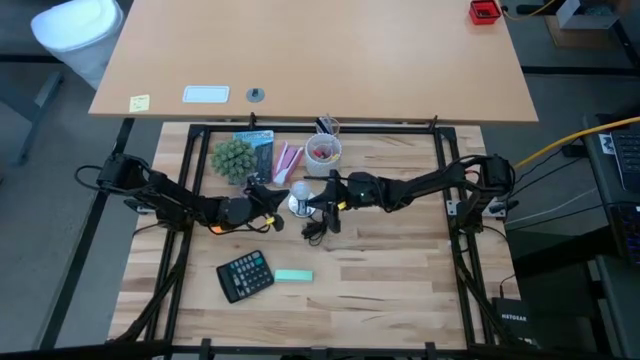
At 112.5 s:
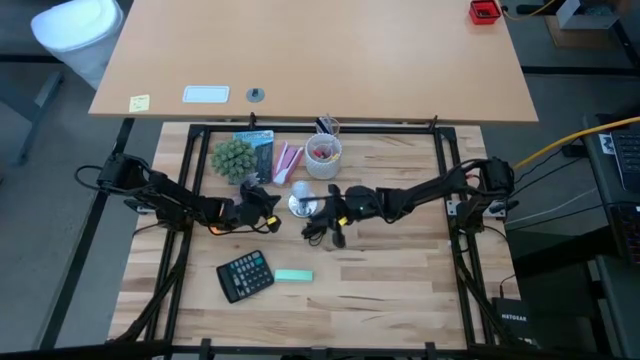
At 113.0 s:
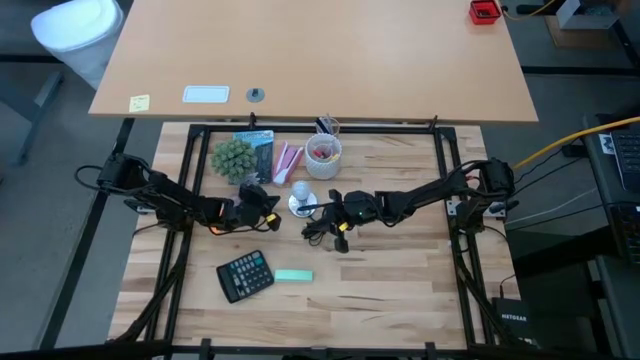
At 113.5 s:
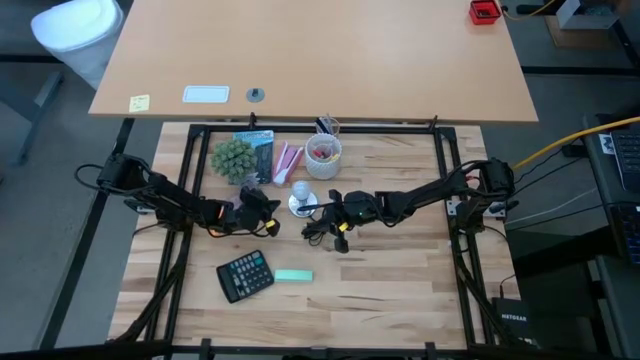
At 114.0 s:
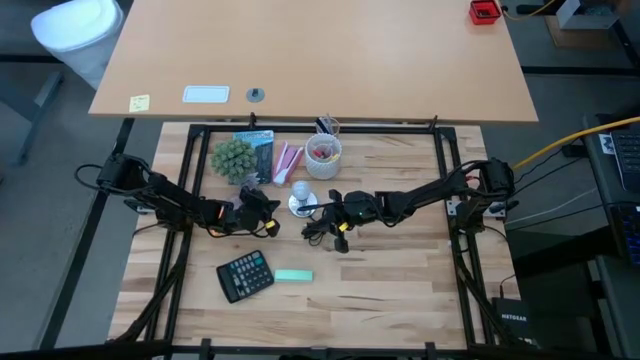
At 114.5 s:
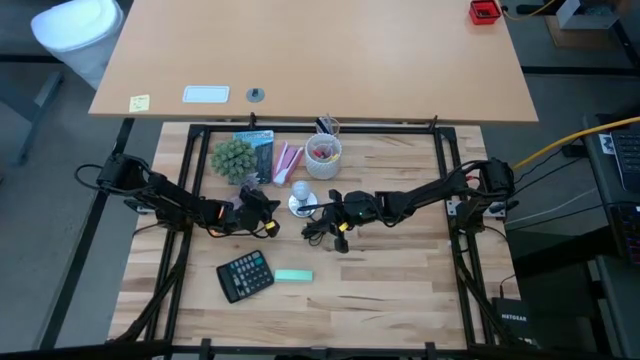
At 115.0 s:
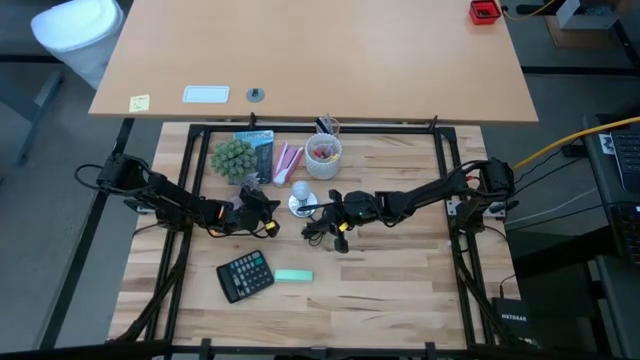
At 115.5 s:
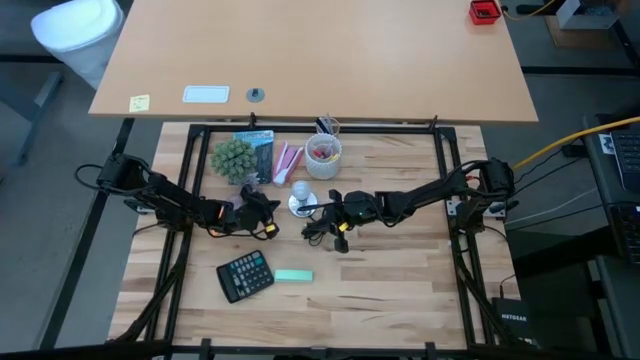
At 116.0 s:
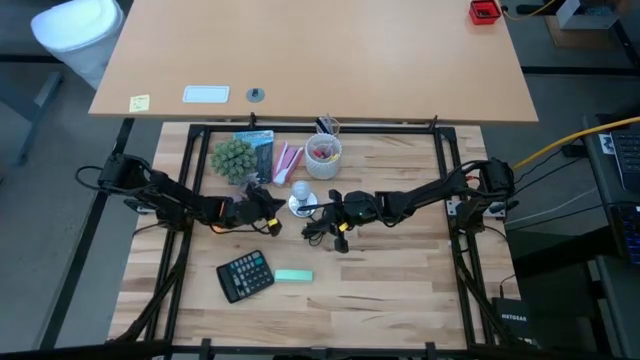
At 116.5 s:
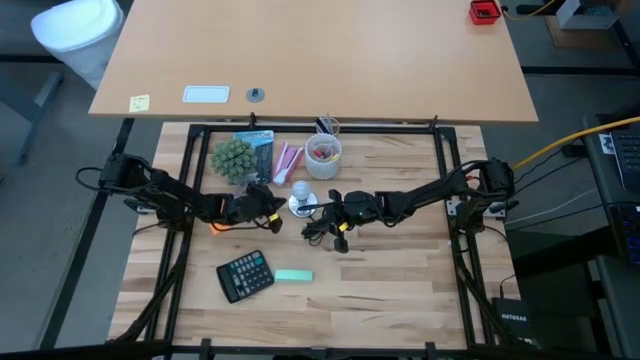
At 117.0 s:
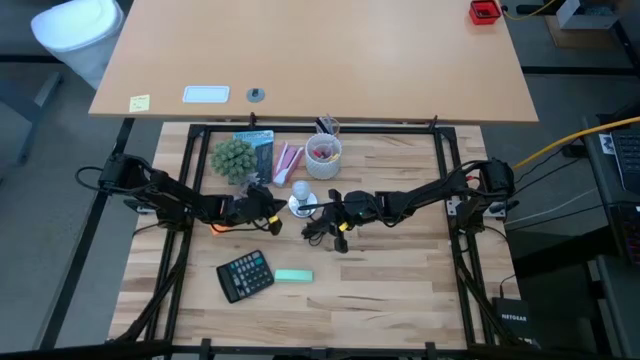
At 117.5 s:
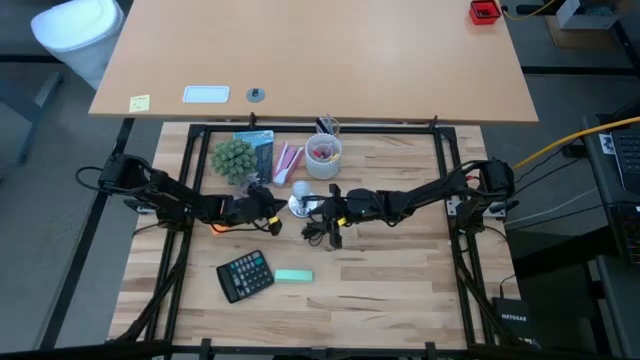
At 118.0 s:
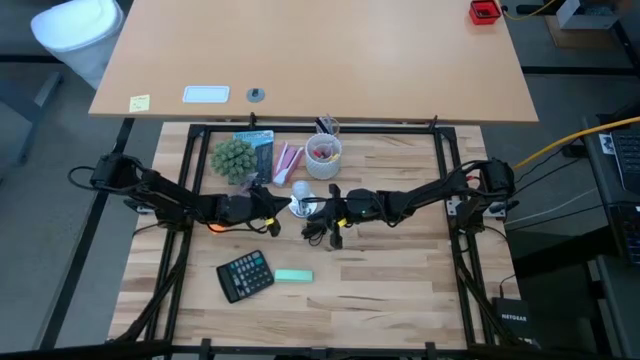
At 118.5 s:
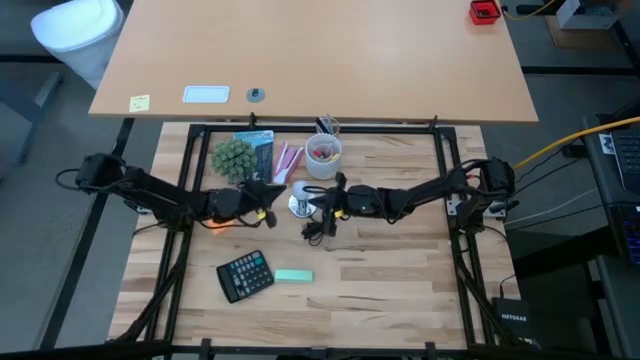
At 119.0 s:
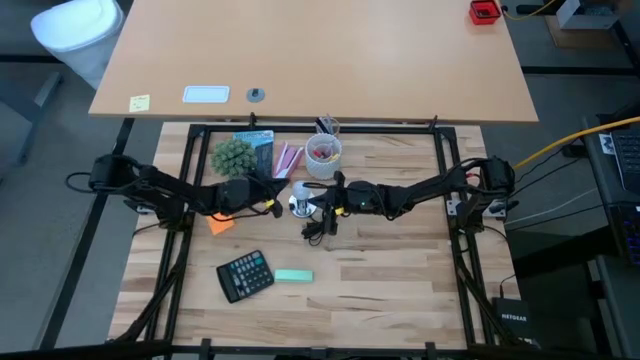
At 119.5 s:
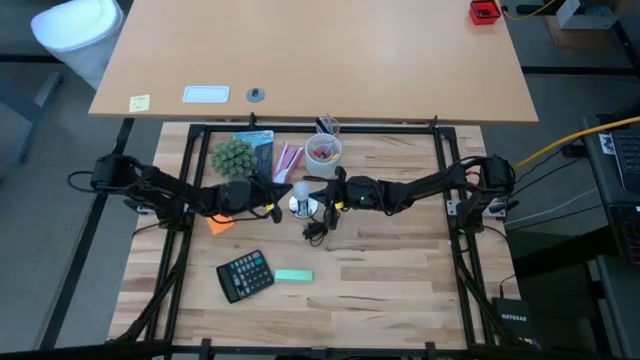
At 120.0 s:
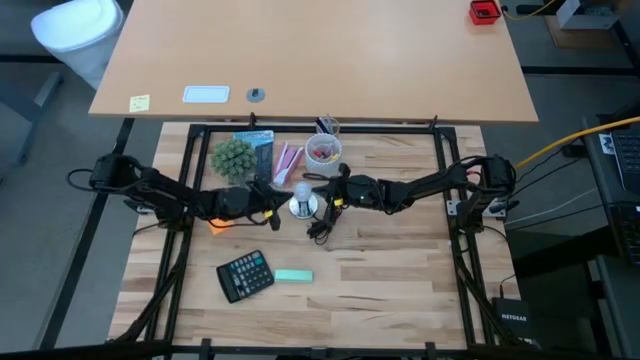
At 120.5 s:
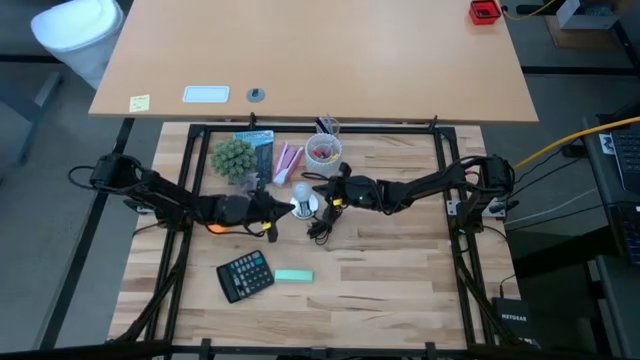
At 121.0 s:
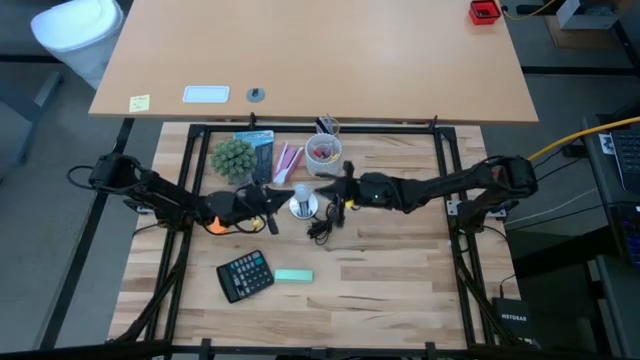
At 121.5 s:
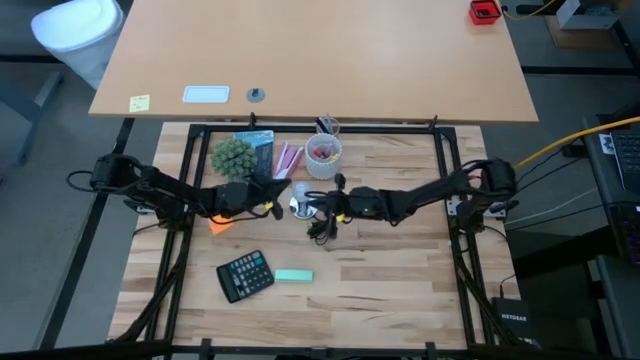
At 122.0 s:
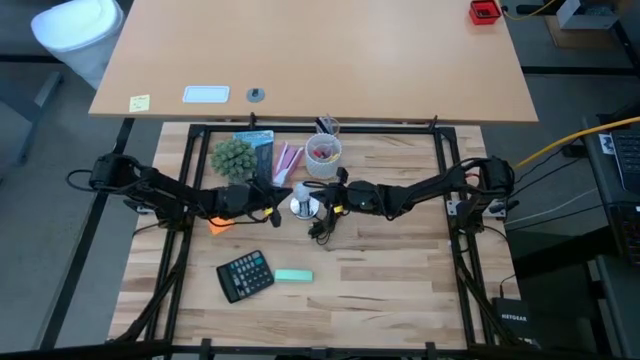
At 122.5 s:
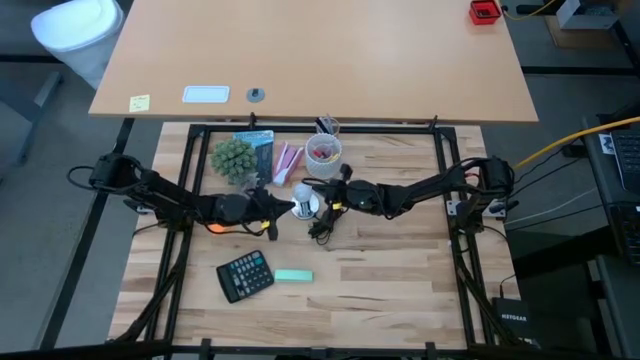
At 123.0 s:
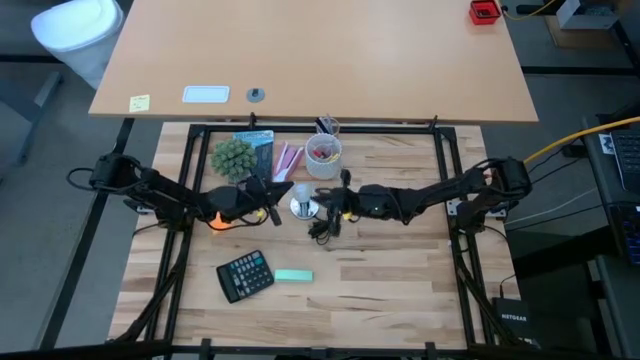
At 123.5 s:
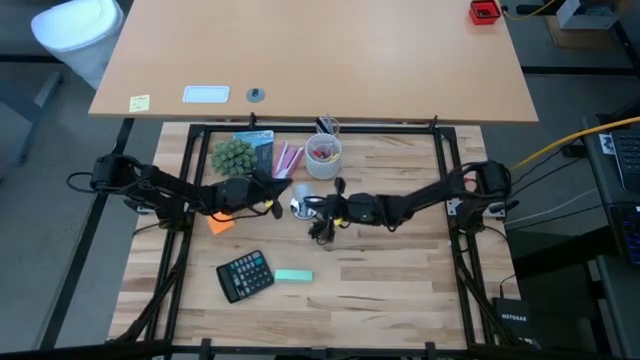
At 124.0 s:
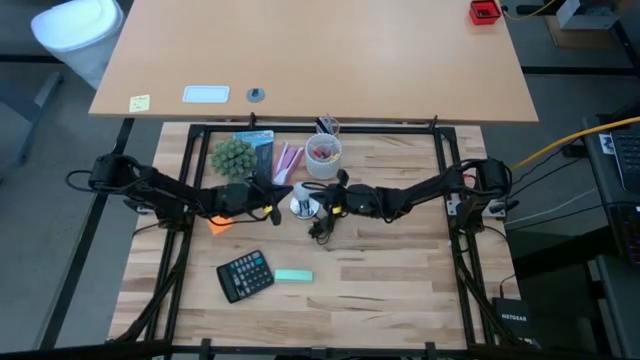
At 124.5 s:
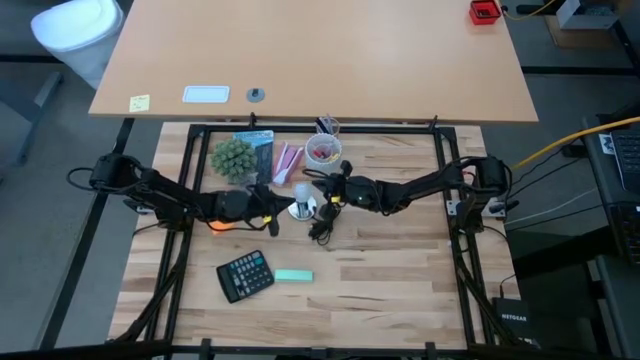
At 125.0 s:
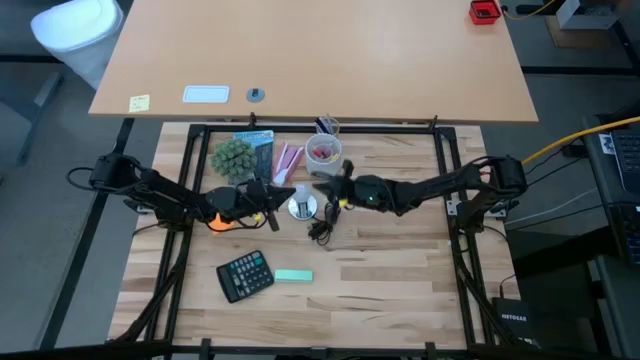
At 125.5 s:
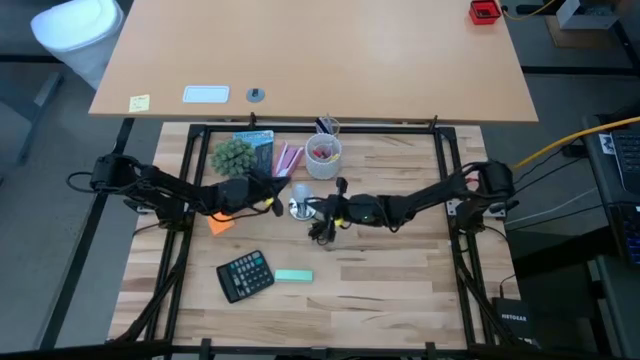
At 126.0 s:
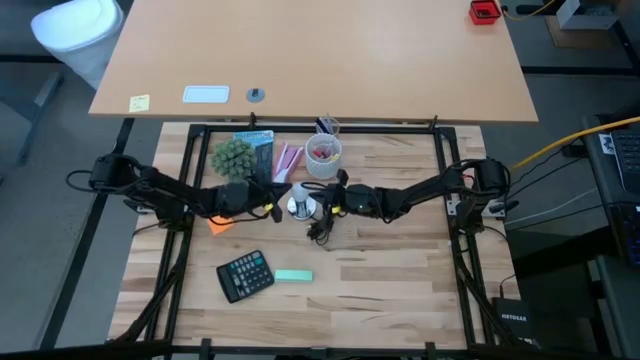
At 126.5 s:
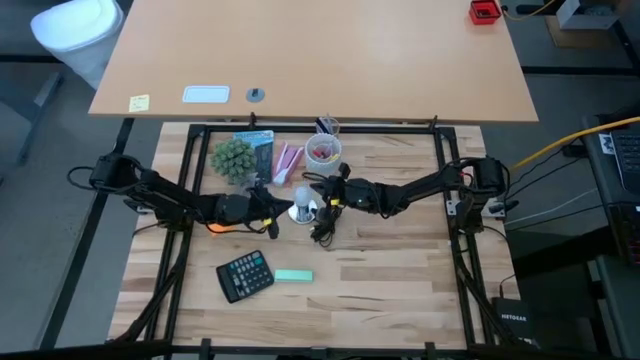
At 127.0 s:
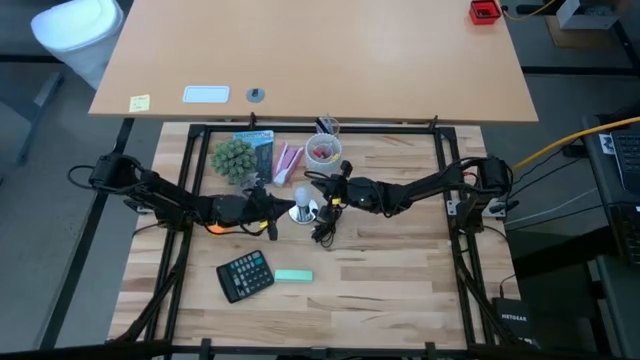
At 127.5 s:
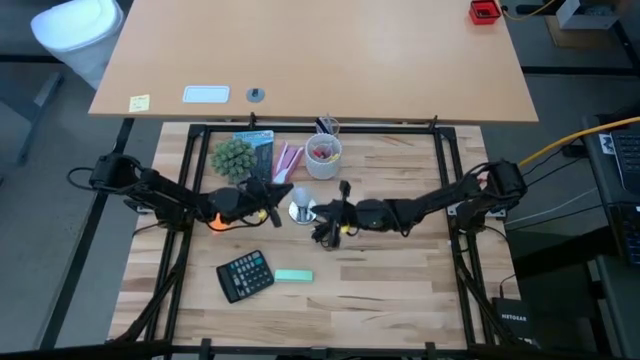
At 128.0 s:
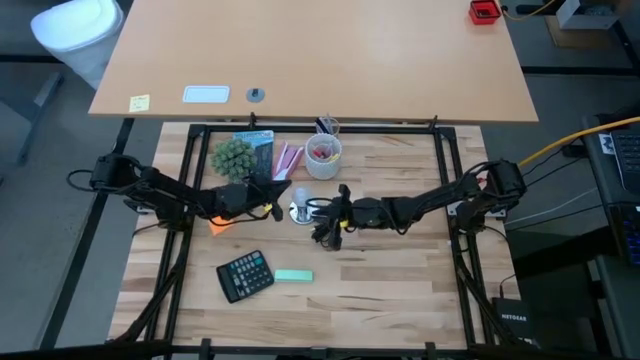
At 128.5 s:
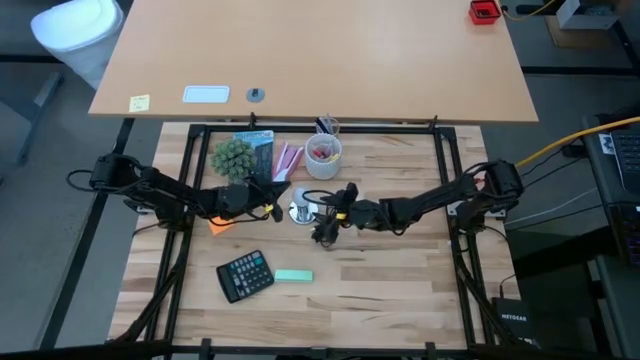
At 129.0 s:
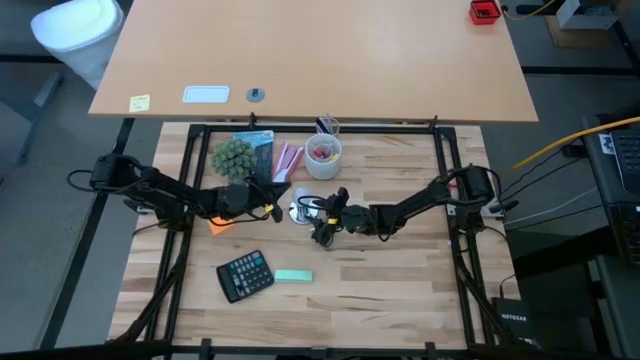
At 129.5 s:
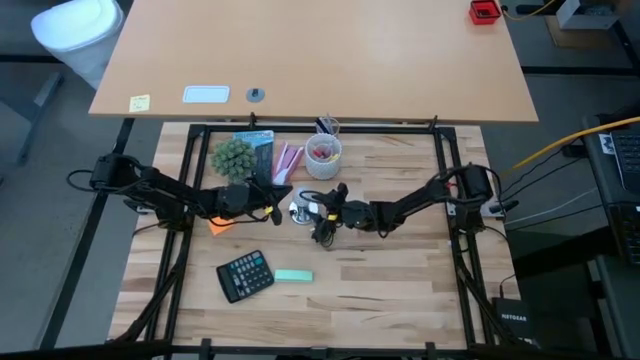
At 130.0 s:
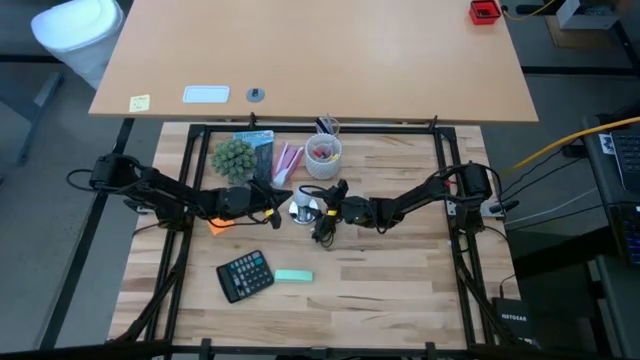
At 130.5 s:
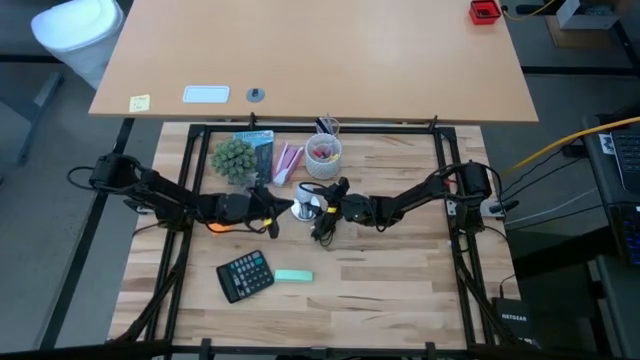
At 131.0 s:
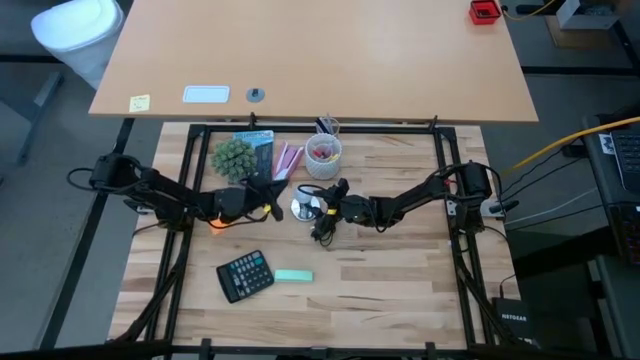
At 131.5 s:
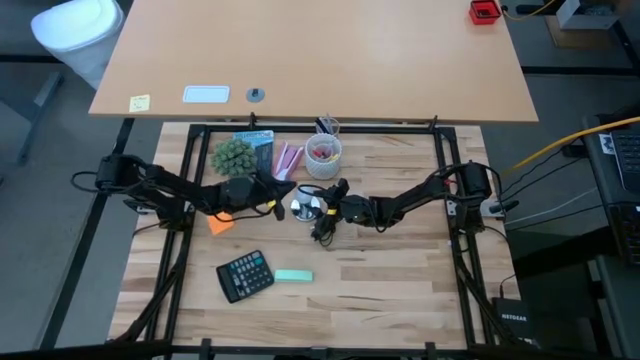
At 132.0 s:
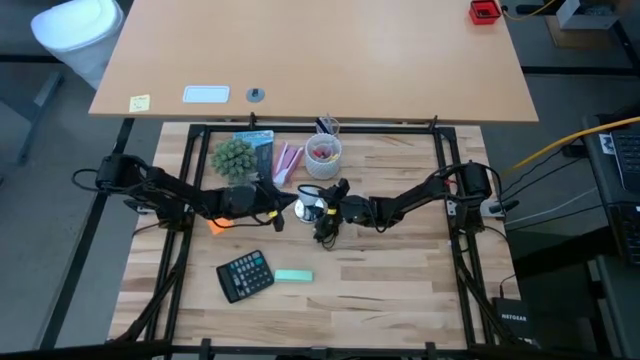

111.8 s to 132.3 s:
Task: Screw lightbulb
Remove the lightbulb from the lamp
